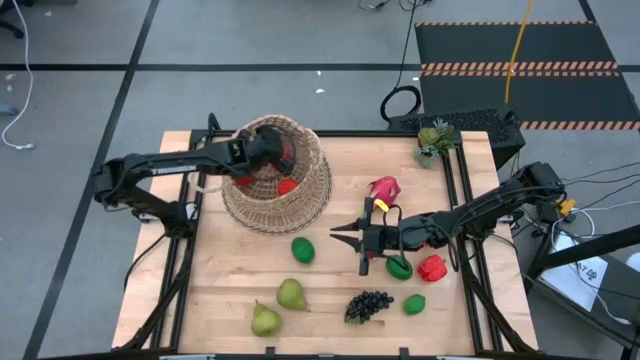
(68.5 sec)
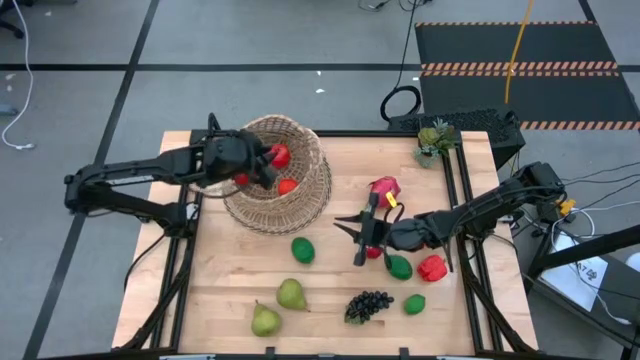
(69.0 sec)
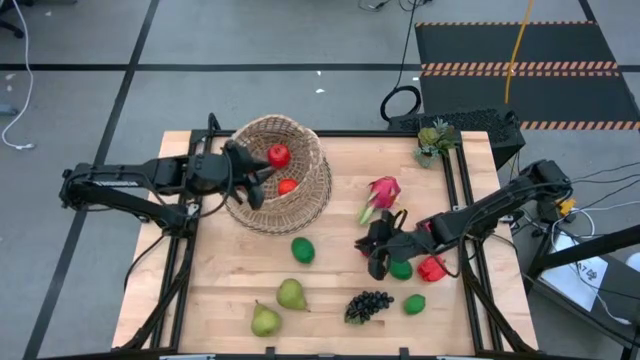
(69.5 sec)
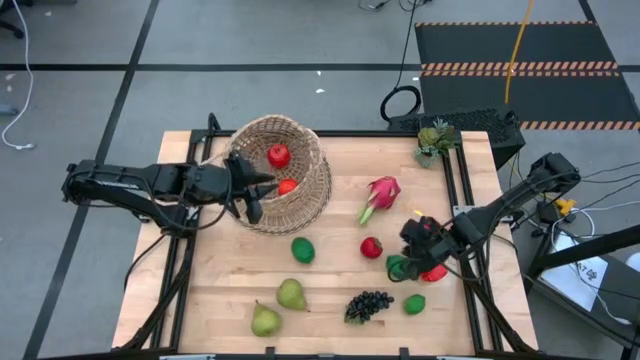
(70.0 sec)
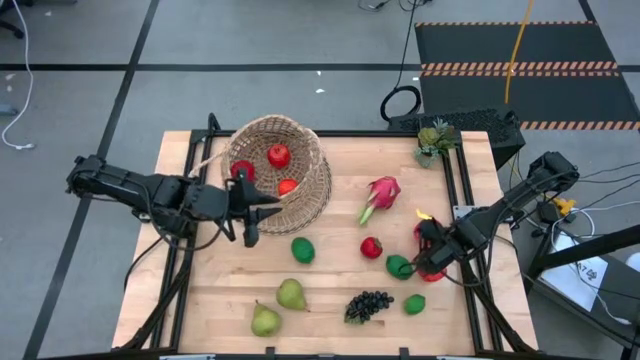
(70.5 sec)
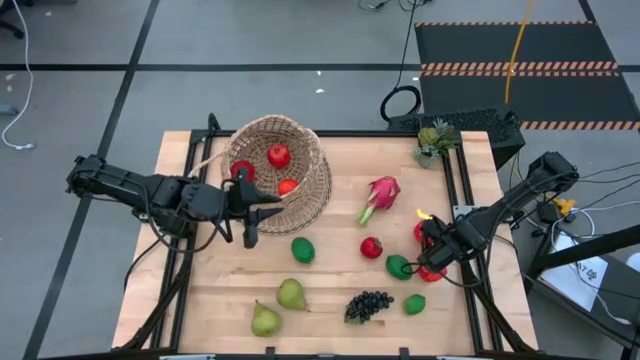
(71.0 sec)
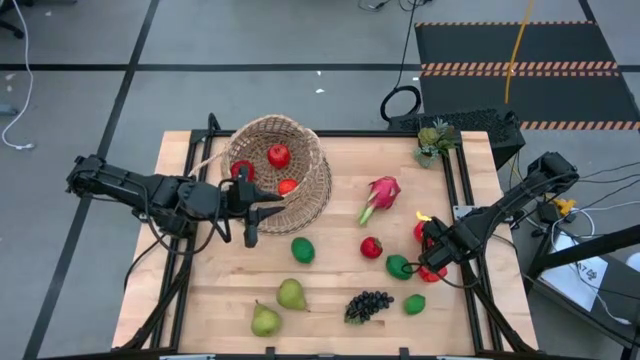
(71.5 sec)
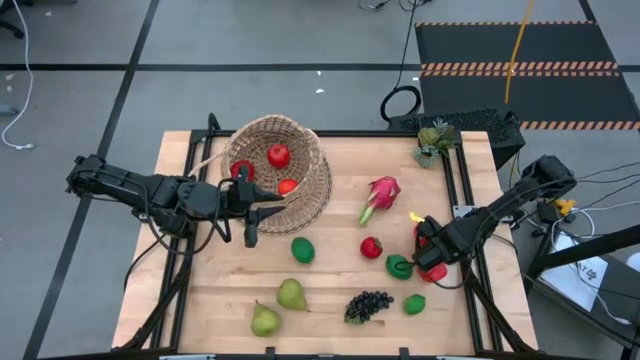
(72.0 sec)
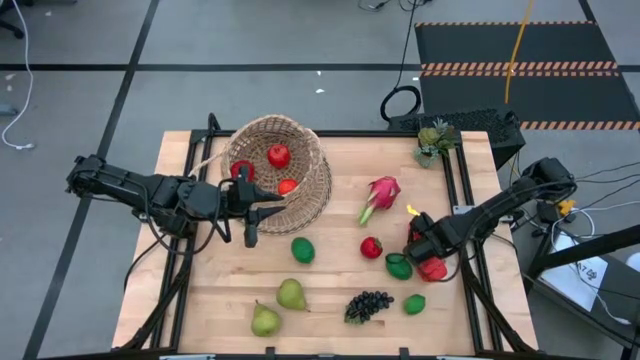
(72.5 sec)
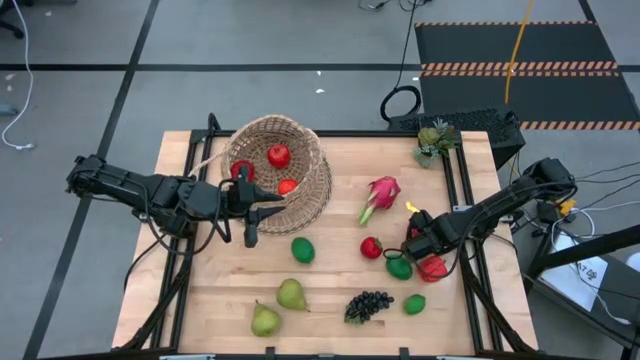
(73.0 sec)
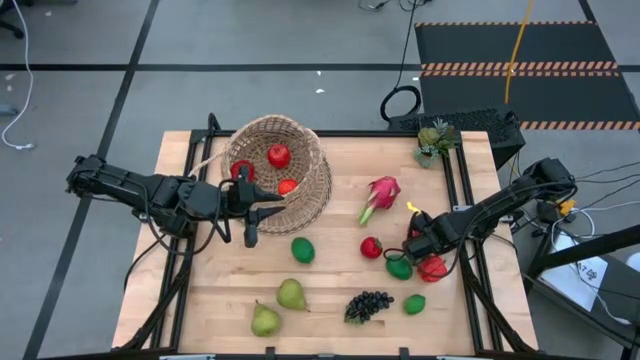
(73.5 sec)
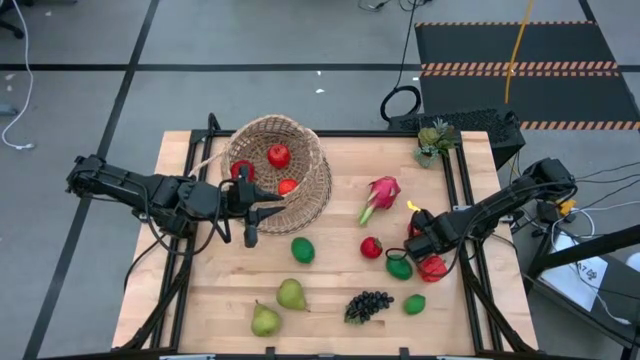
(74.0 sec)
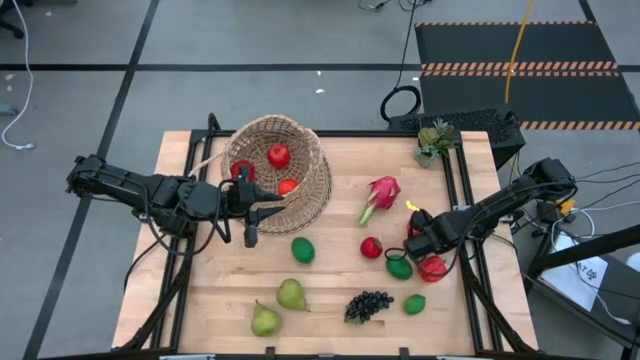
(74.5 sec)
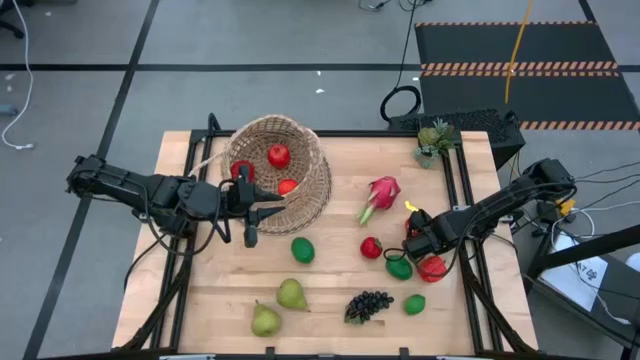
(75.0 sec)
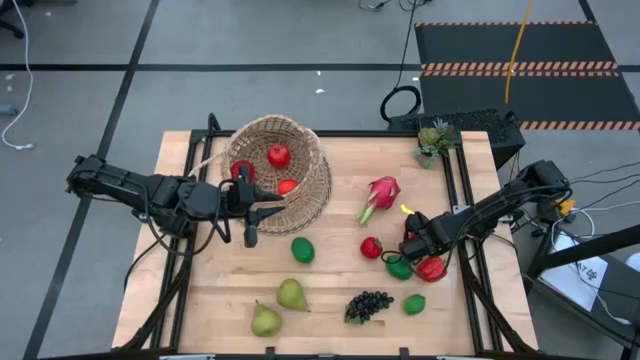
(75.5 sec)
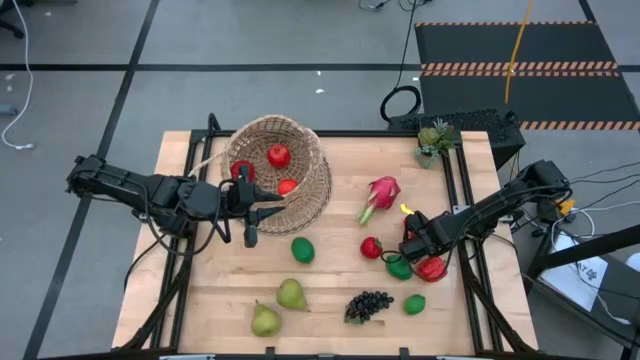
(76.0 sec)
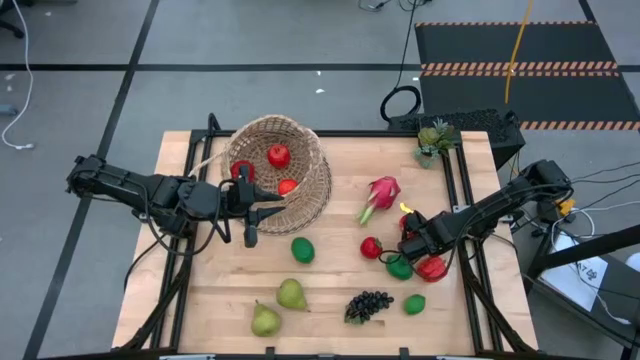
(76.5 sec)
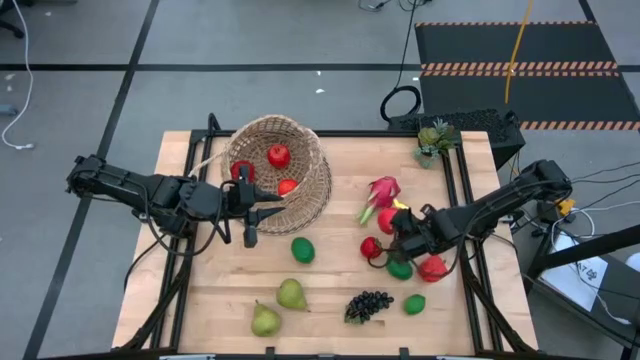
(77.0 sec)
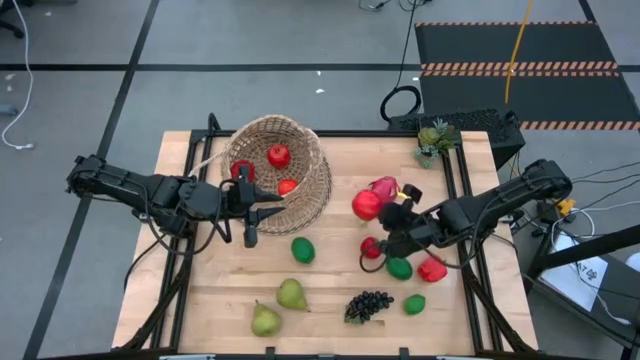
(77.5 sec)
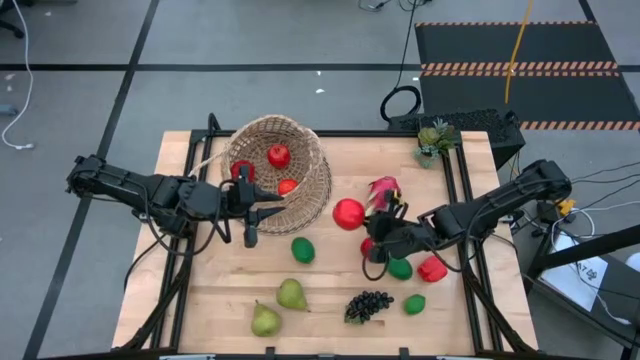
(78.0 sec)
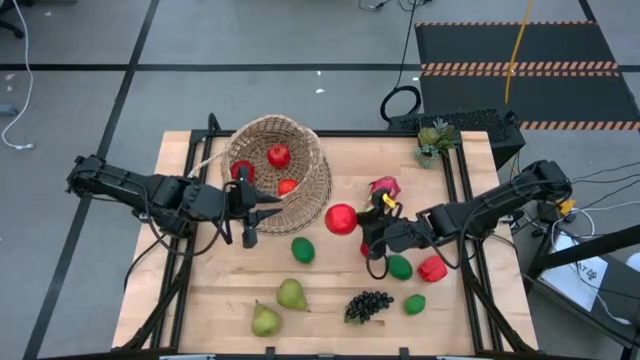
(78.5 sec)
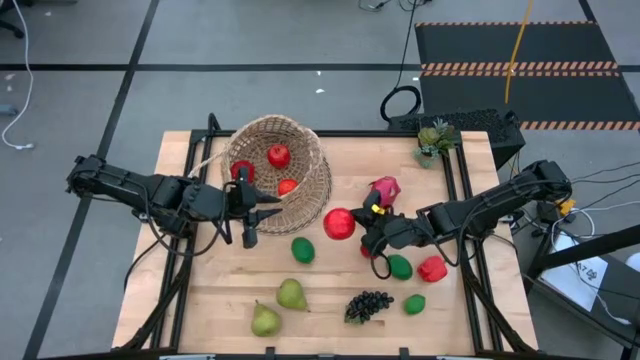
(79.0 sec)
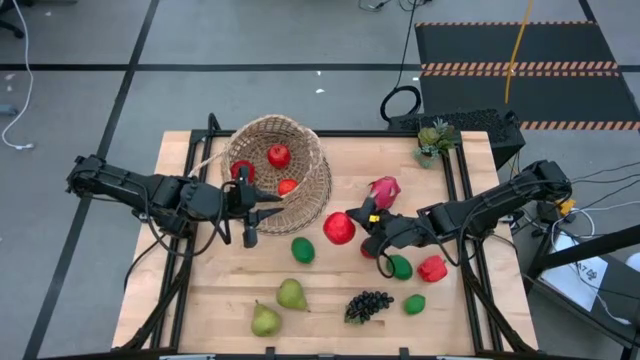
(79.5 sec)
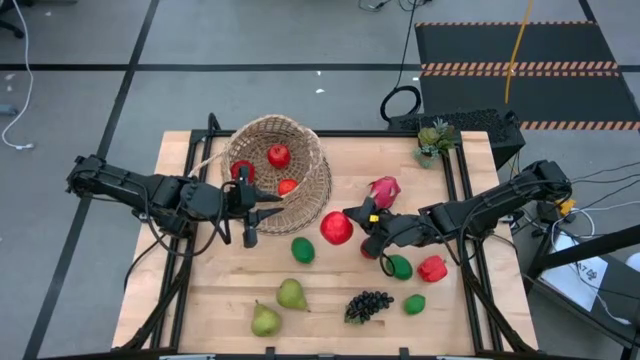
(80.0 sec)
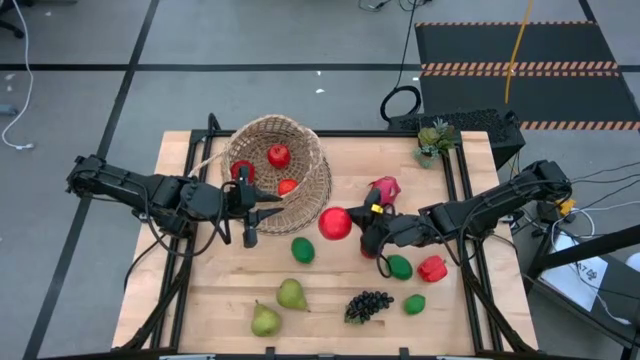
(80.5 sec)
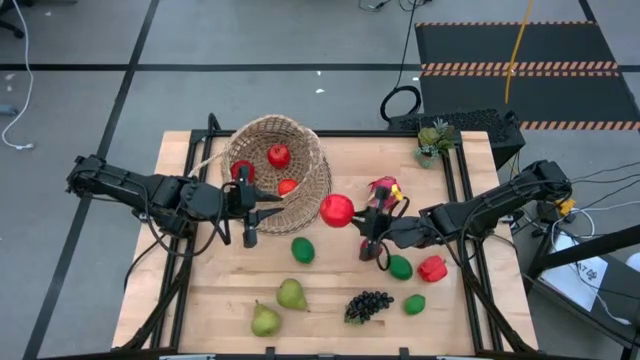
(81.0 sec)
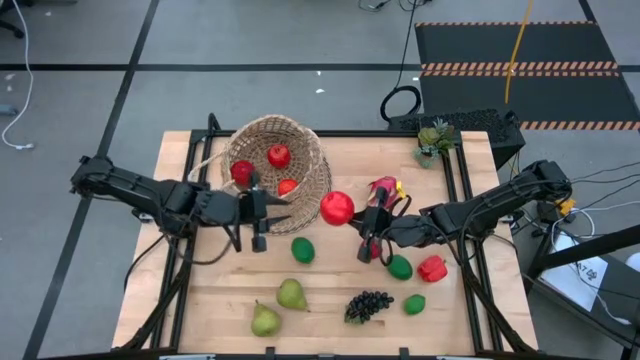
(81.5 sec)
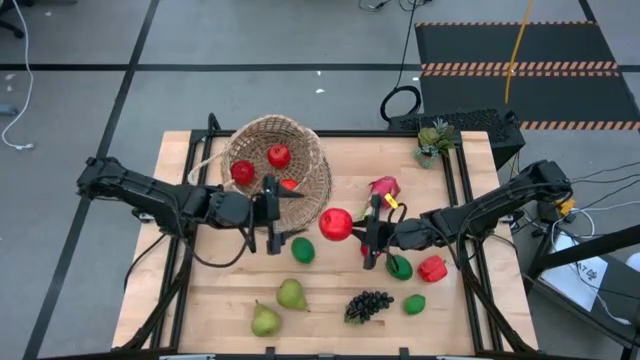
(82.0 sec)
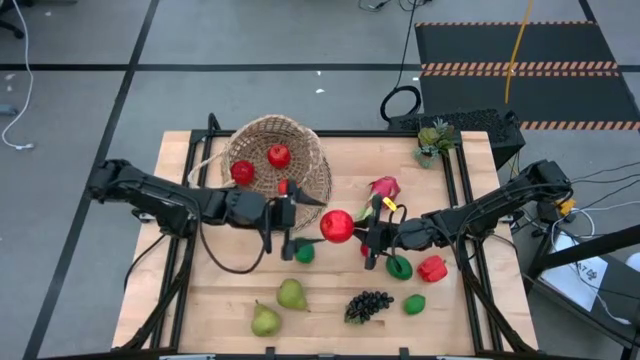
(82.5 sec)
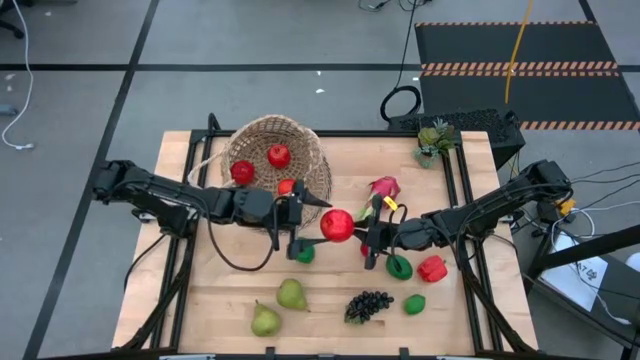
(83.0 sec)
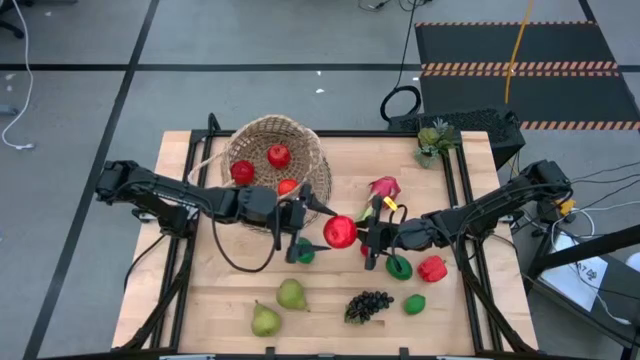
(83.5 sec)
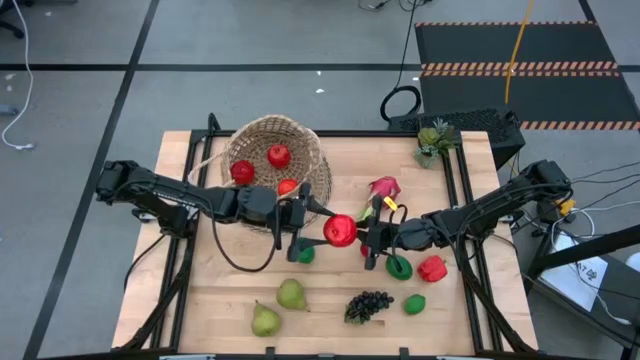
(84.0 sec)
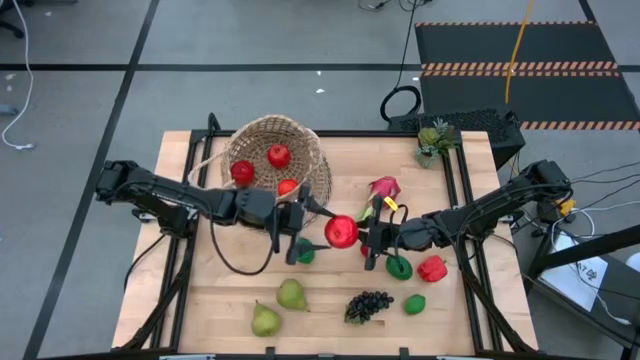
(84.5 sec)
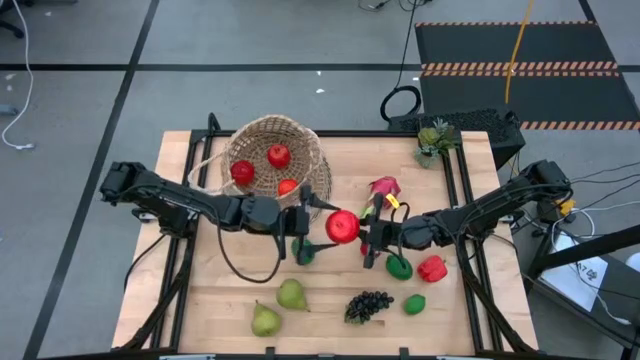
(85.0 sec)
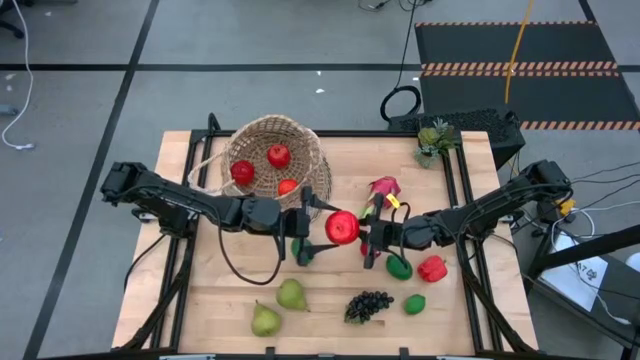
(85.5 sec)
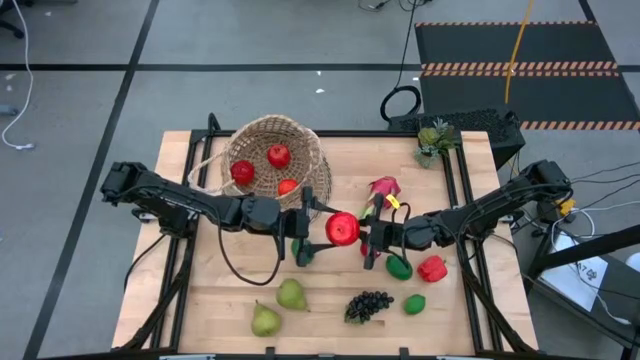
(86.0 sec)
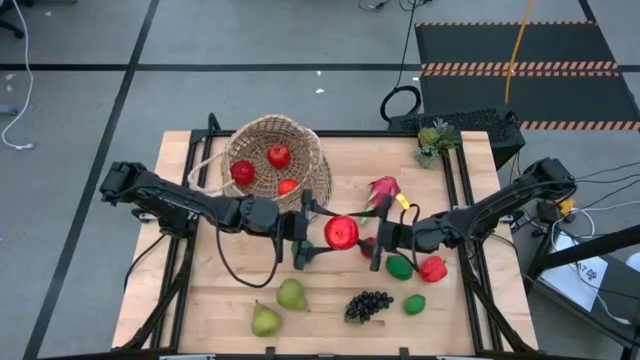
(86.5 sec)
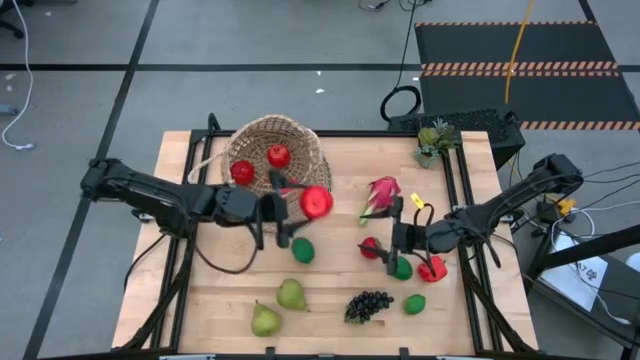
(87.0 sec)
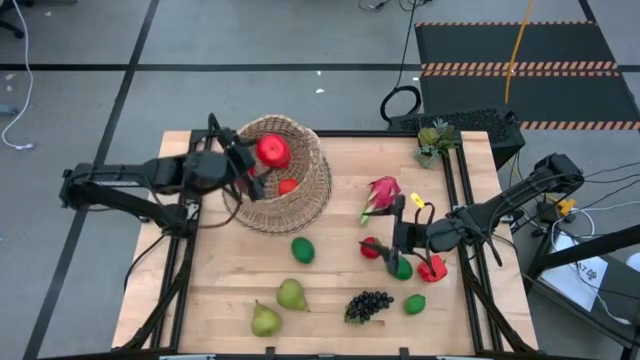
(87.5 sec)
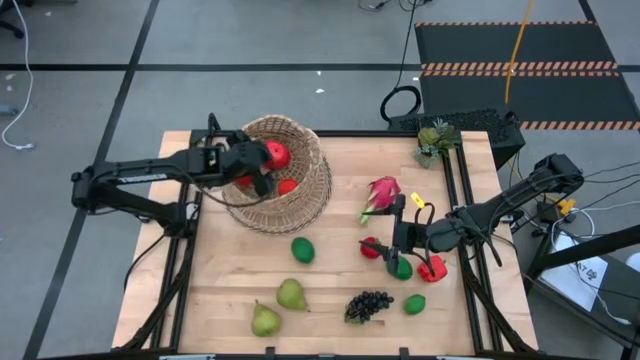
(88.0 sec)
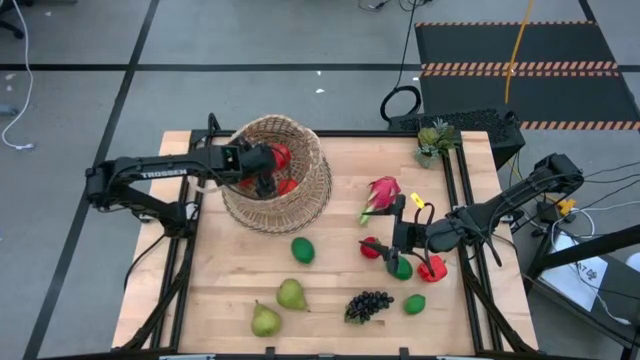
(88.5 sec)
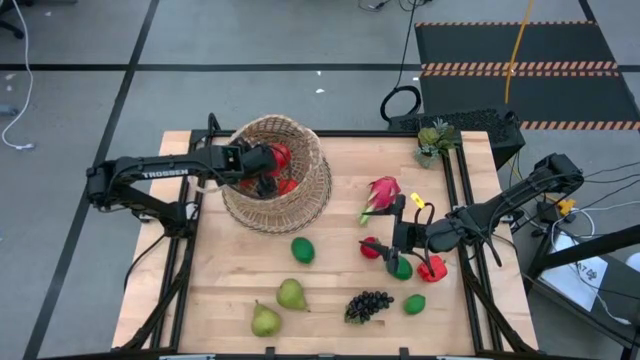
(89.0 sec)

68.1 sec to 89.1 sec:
Task: Build produce basket
Put the apple into the basket
